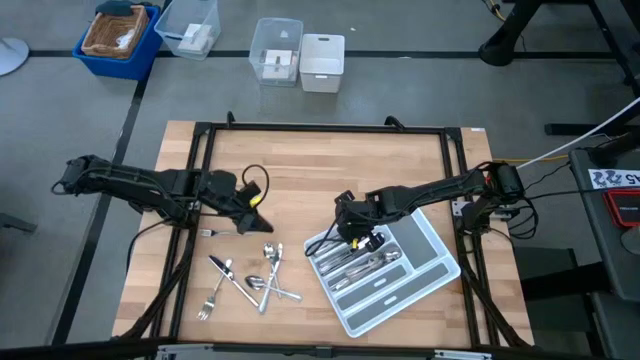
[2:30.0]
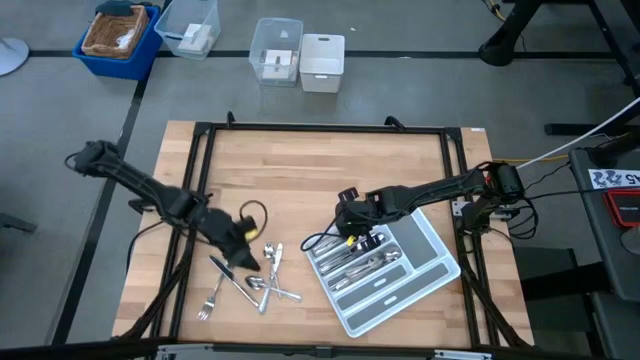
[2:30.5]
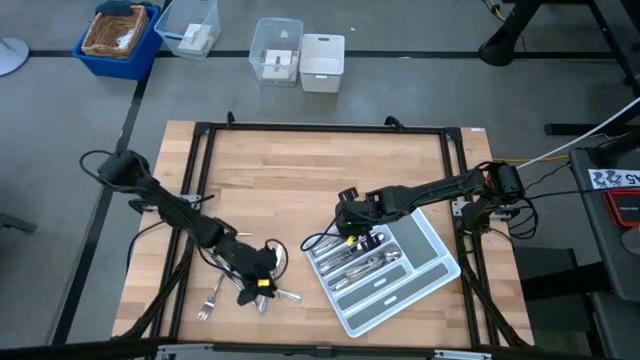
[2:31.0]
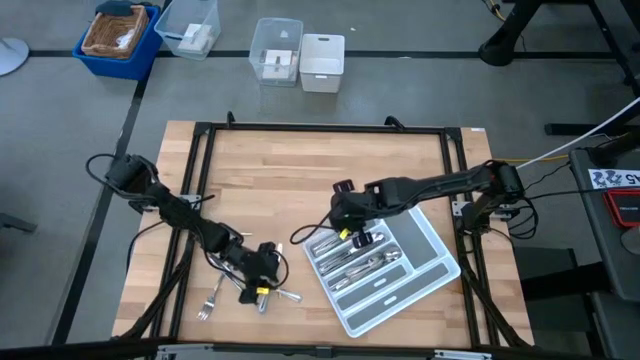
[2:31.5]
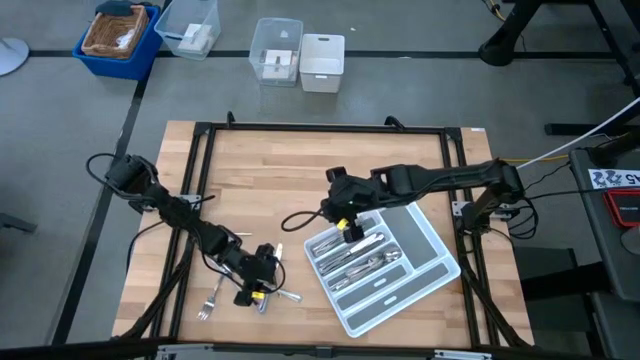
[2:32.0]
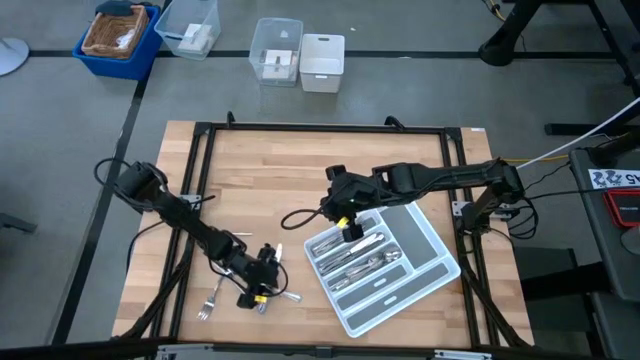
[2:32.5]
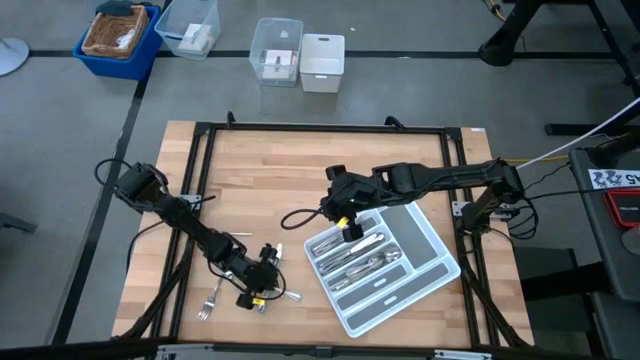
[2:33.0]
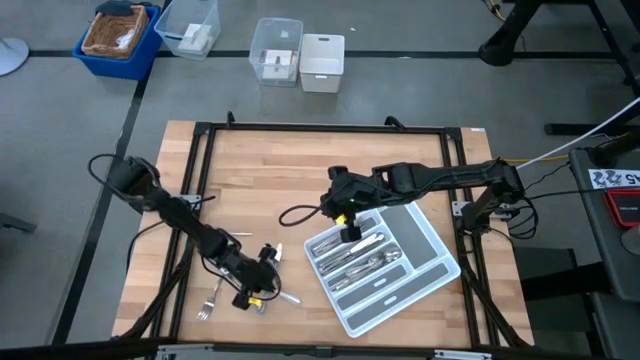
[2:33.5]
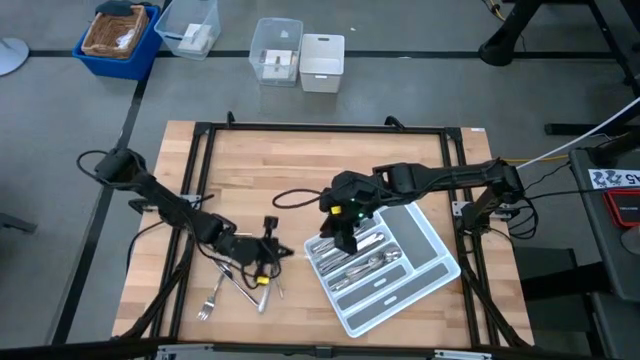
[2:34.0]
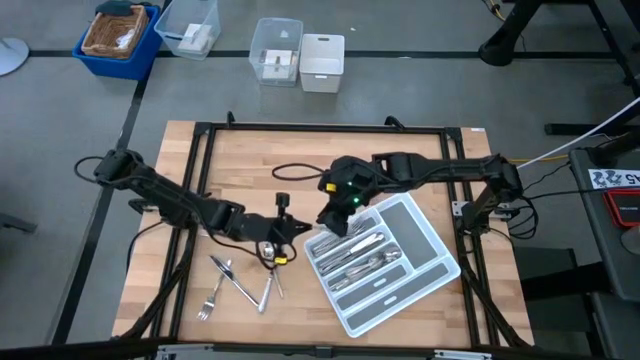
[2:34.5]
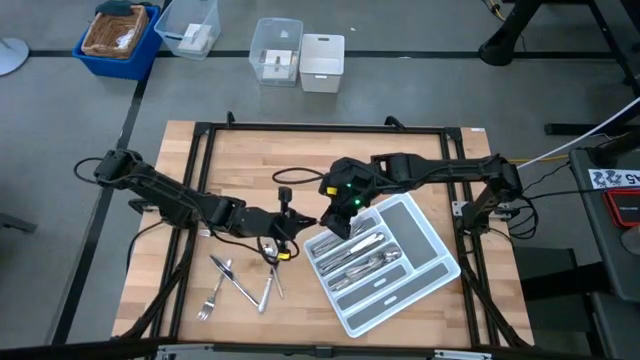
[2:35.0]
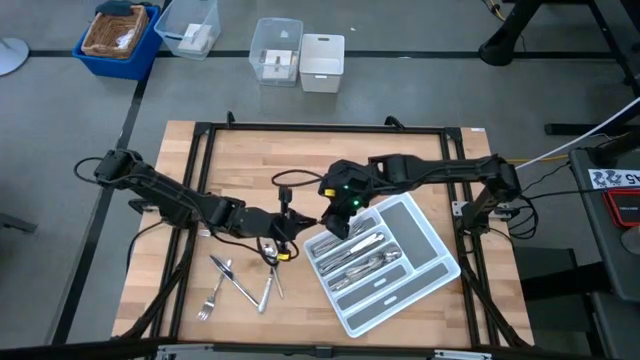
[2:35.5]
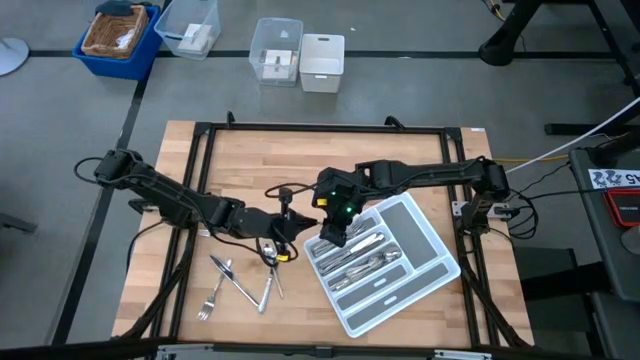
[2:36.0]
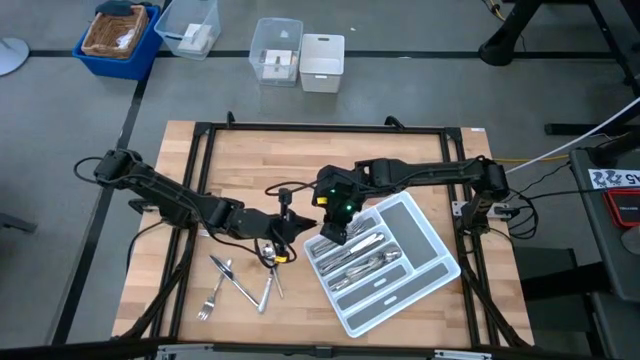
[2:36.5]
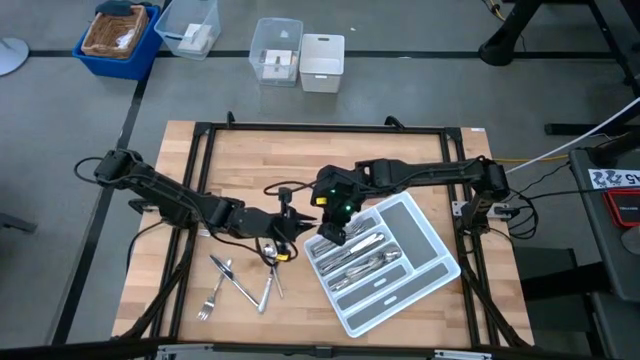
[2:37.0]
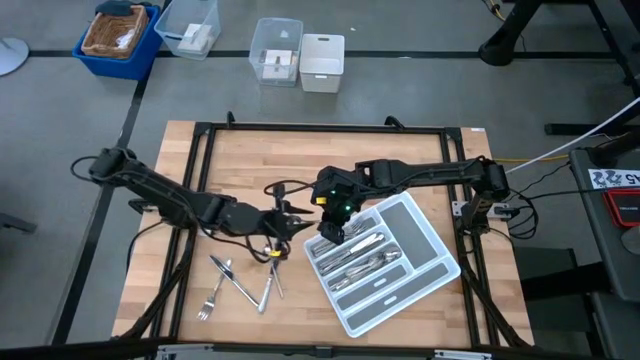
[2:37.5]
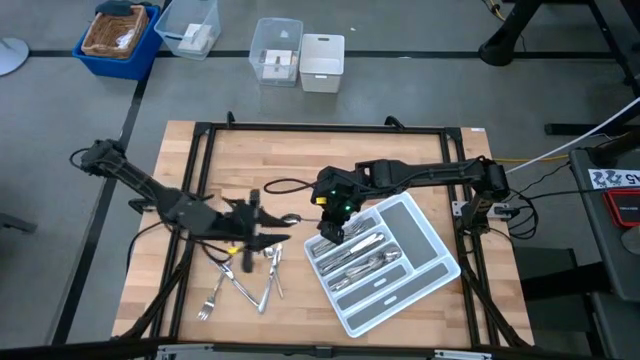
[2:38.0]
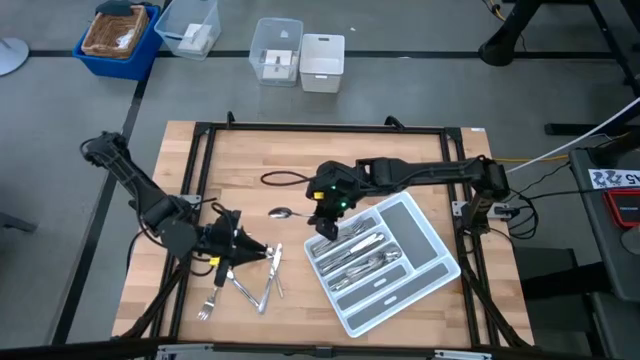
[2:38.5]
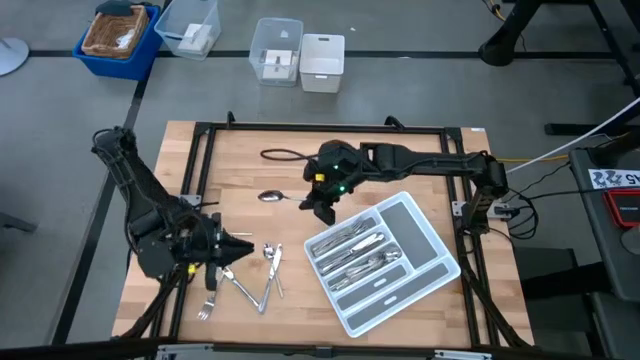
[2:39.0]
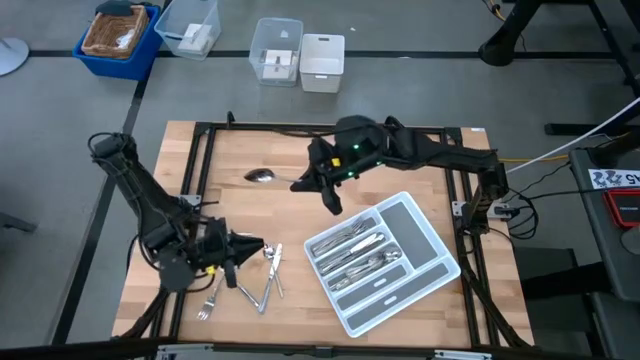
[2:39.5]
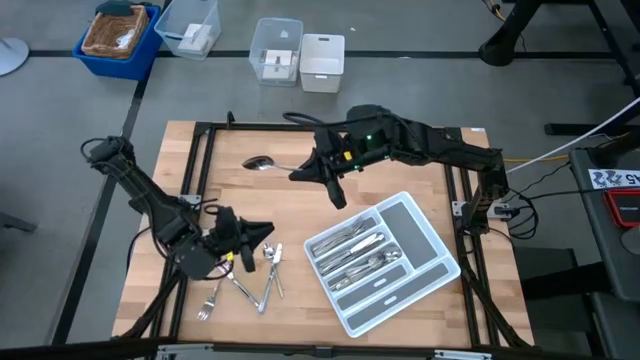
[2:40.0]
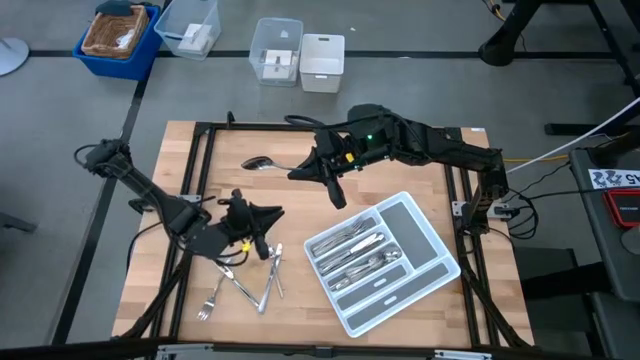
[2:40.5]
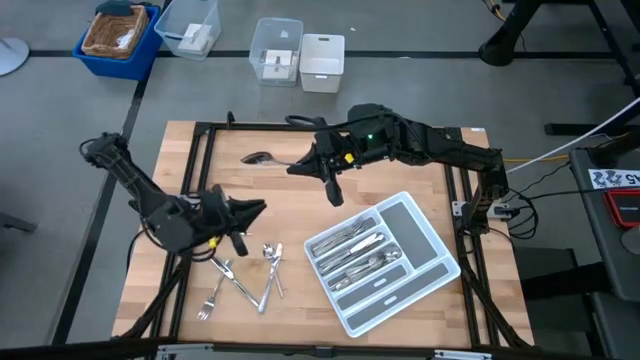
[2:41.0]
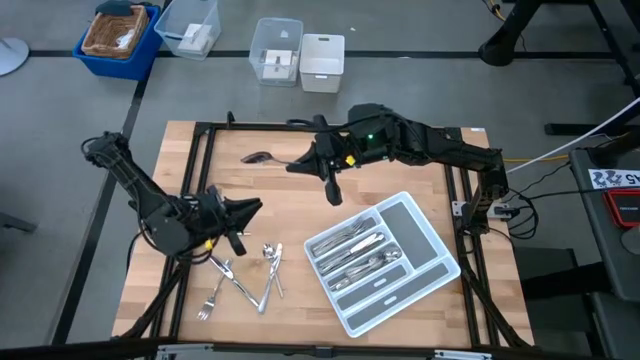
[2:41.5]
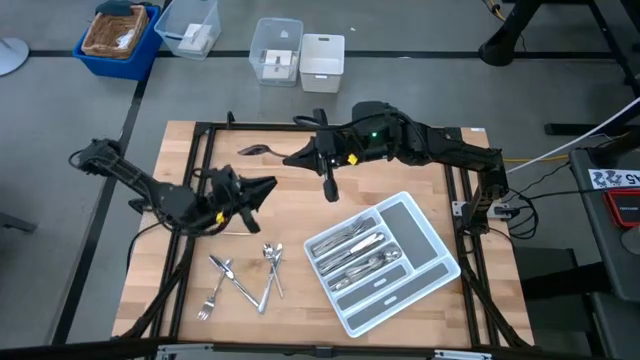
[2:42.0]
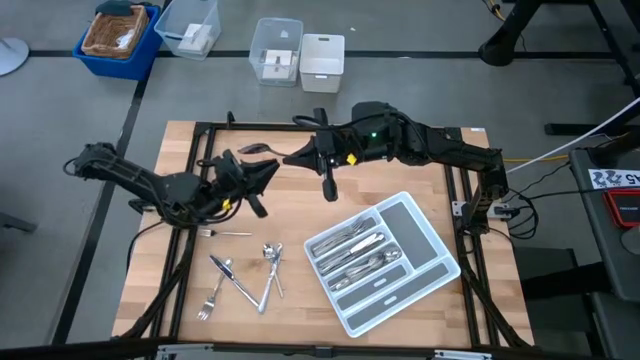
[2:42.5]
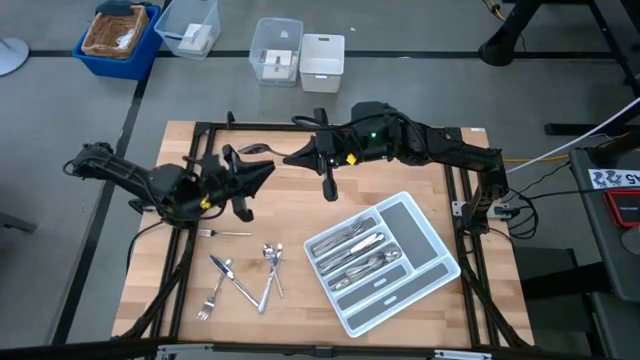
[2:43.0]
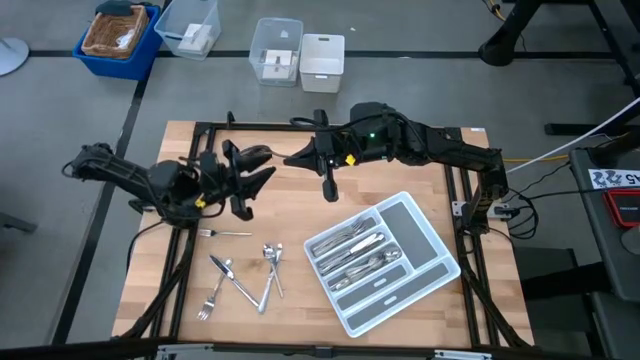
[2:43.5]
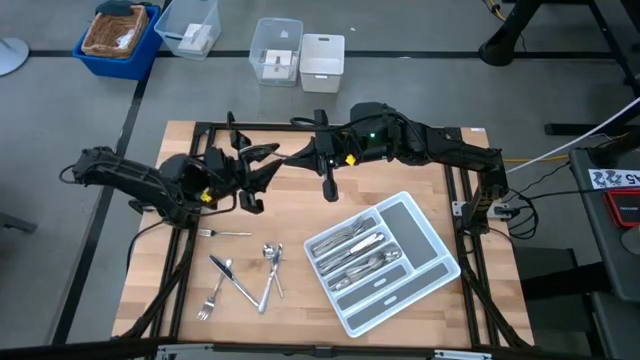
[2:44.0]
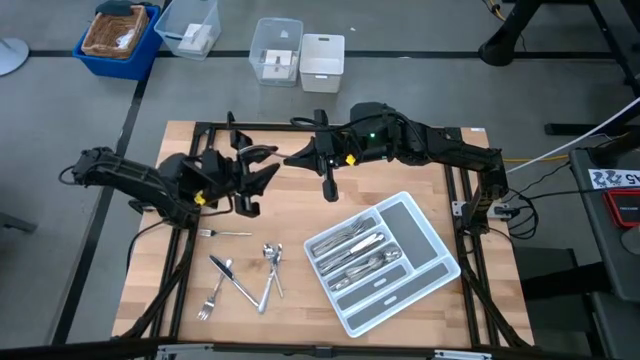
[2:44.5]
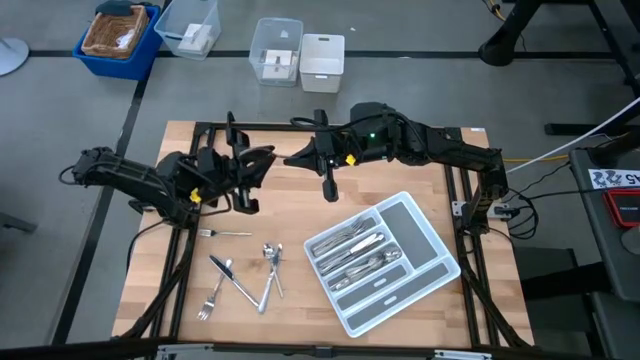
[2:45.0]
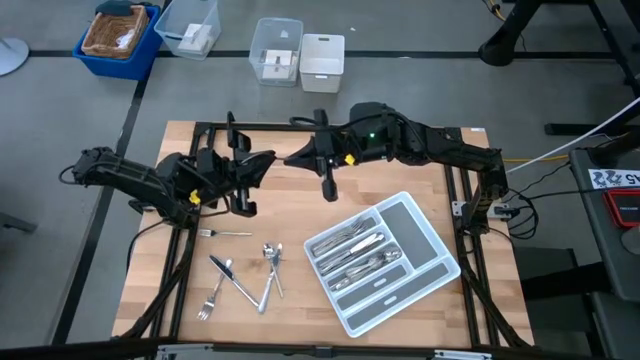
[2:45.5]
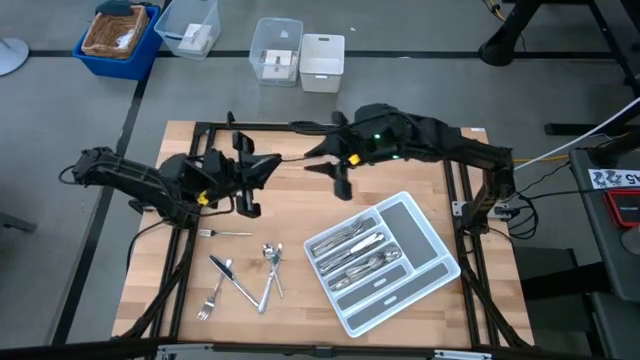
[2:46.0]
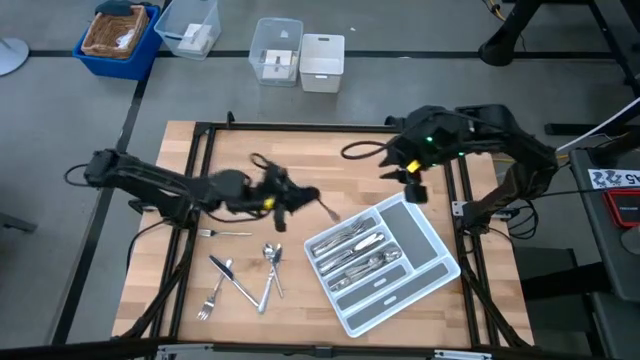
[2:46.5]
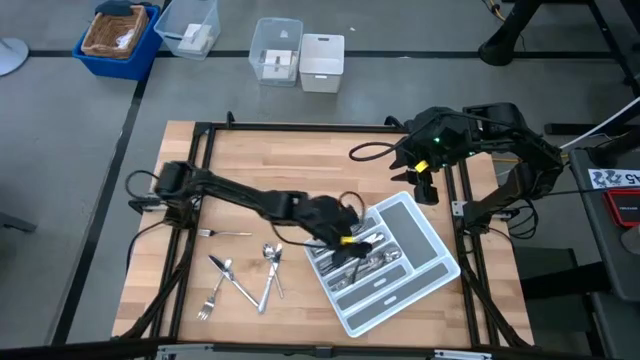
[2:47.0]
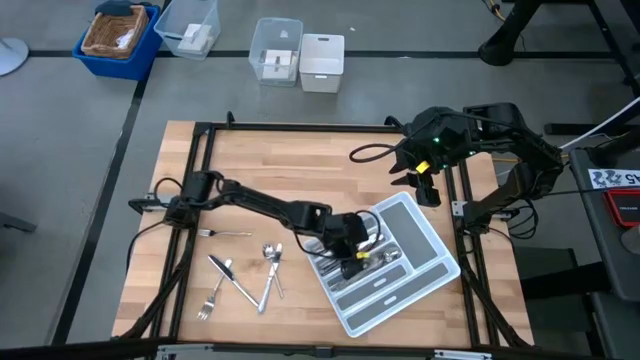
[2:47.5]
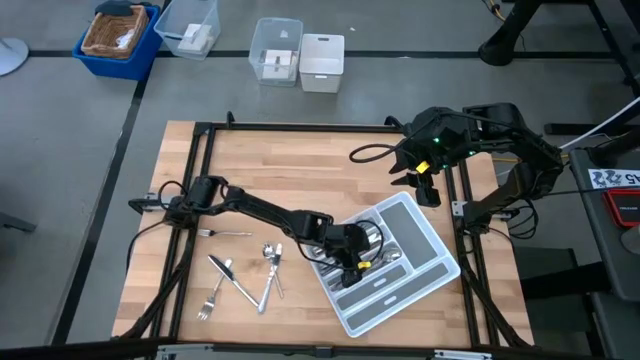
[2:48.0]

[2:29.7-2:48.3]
Task: Sort silverware
Put the silver spoon into the silverware tray

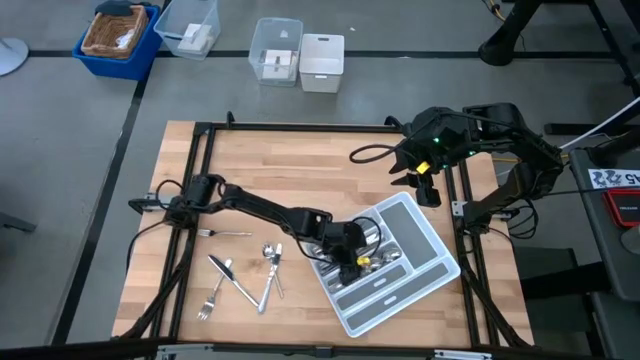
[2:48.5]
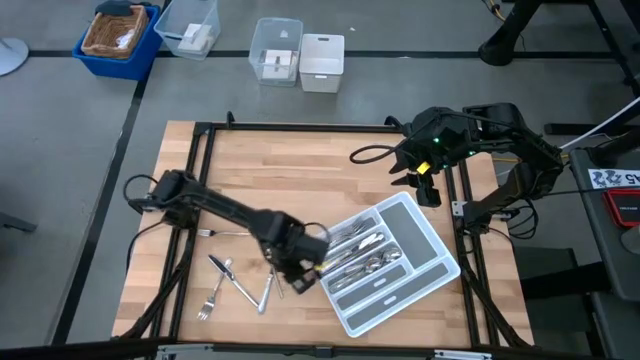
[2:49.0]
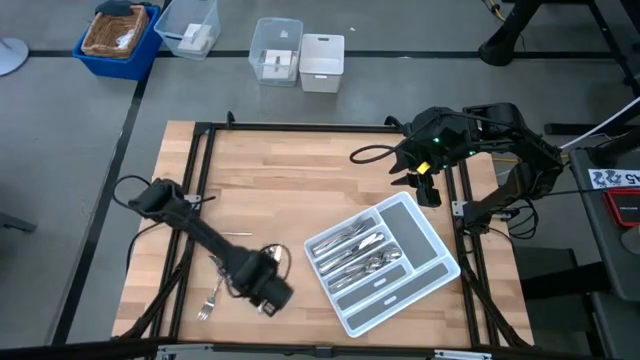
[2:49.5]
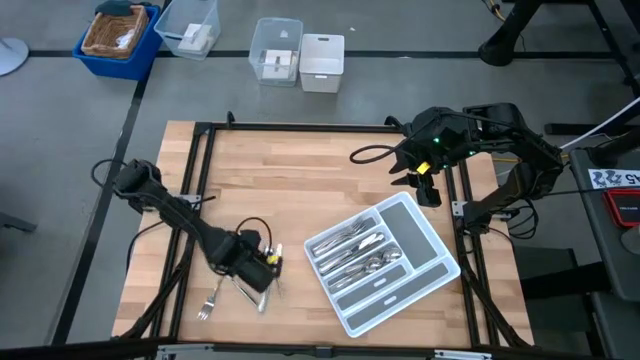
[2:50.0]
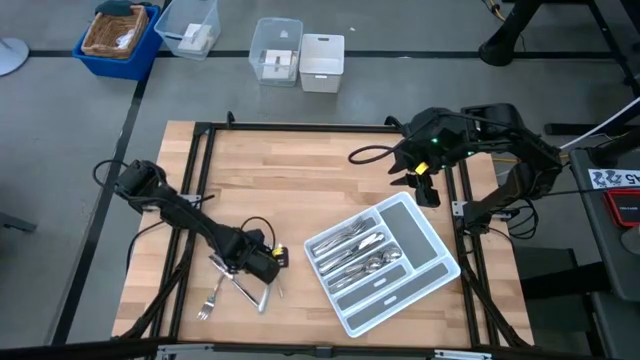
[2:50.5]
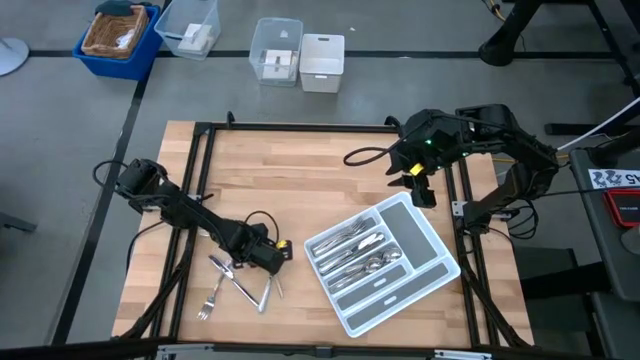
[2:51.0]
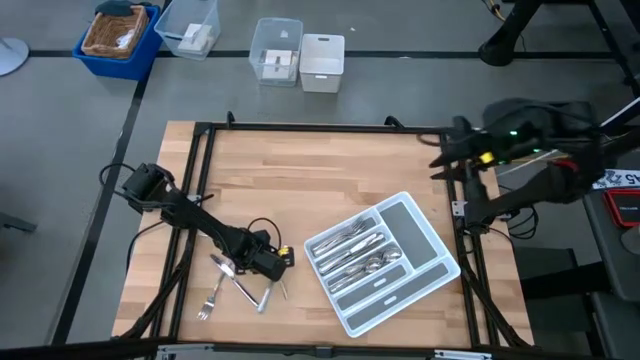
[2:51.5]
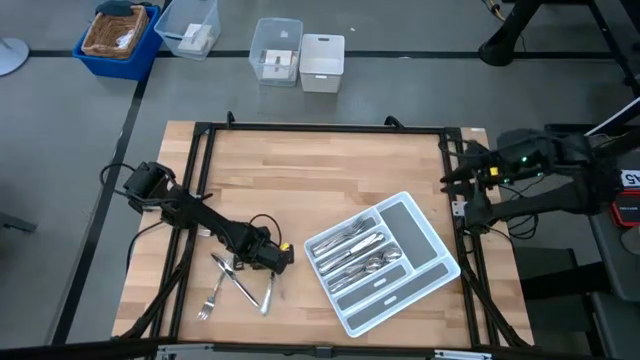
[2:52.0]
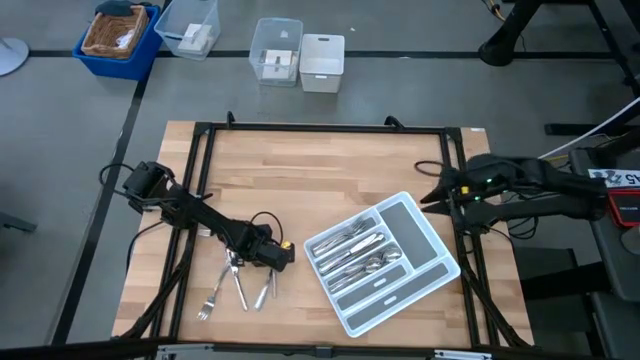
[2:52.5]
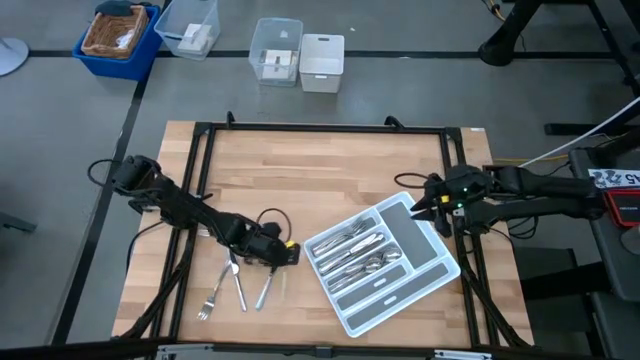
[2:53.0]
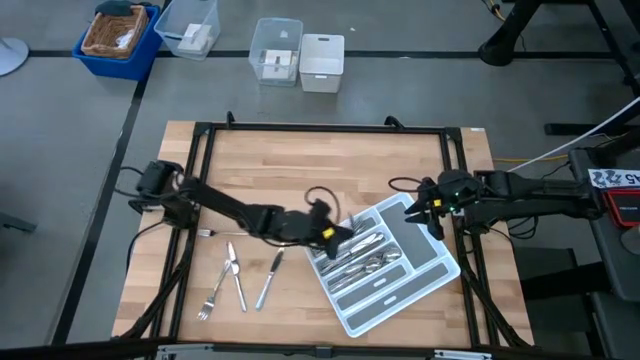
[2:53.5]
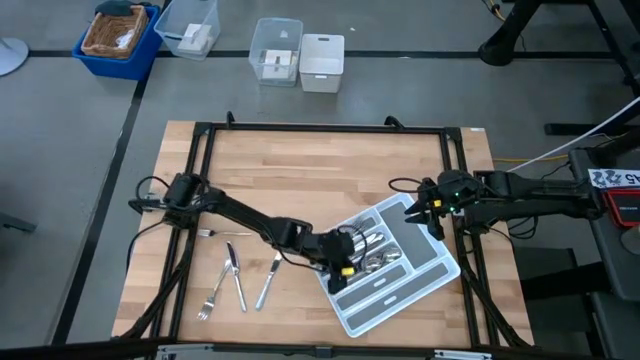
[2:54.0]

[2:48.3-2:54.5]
Put the silver spoon into the silverware tray
